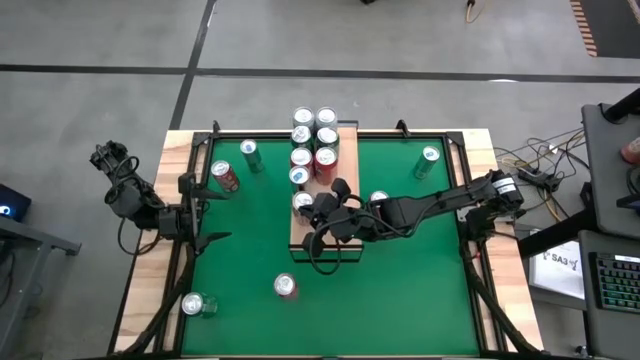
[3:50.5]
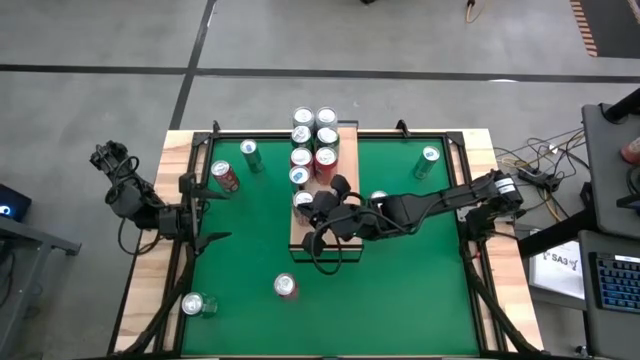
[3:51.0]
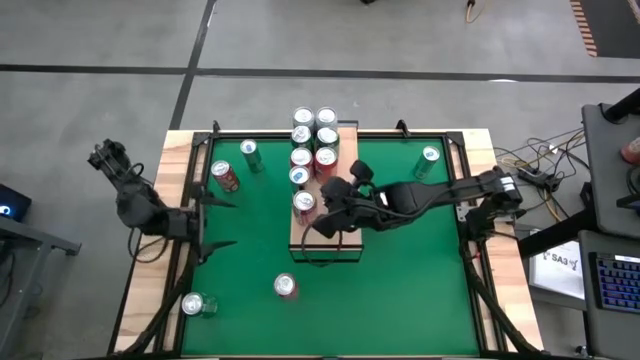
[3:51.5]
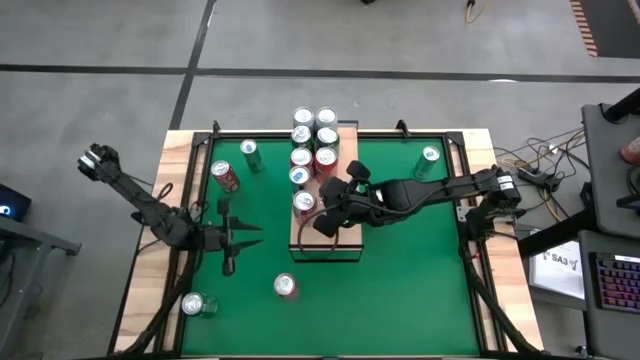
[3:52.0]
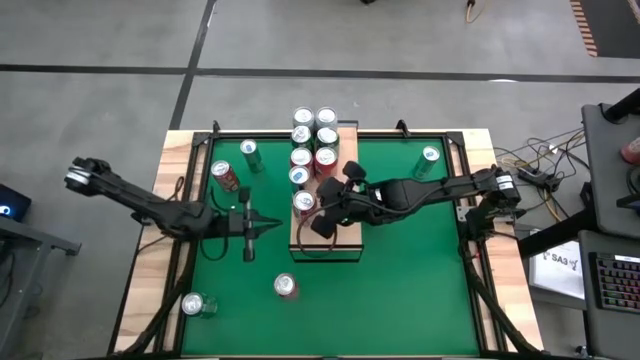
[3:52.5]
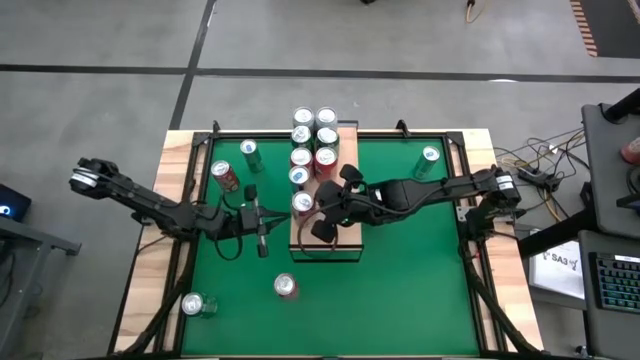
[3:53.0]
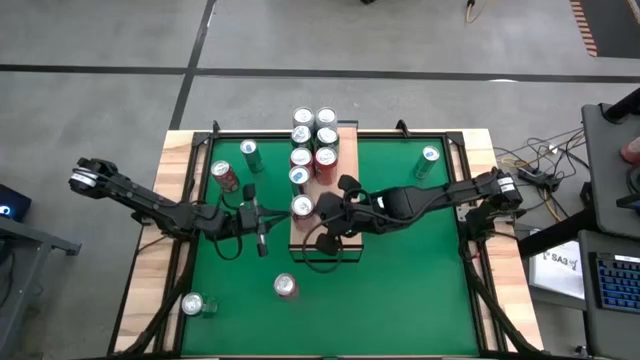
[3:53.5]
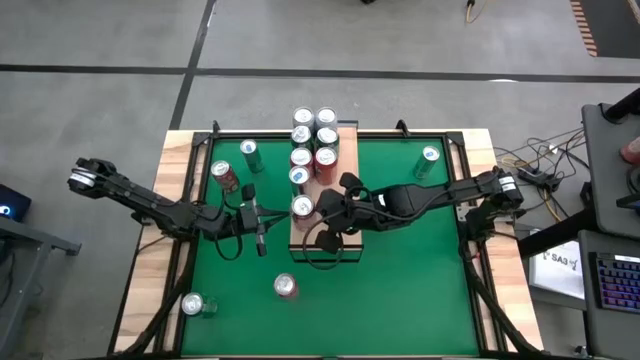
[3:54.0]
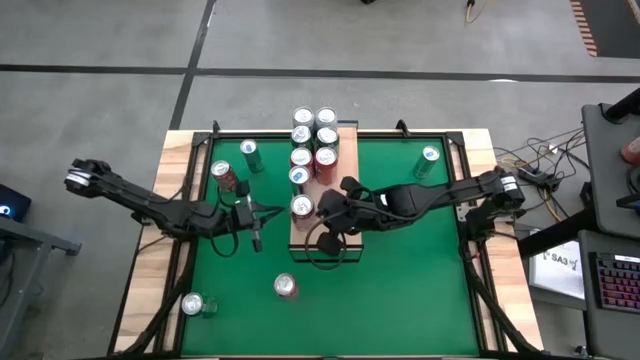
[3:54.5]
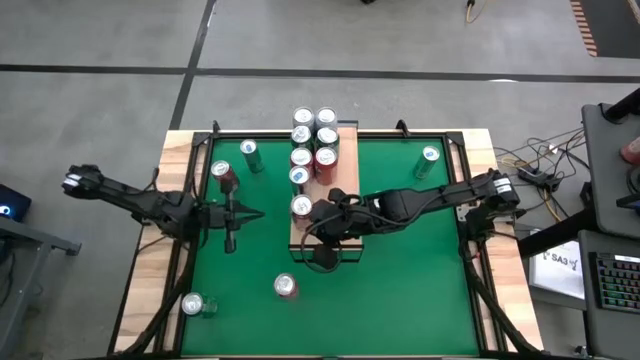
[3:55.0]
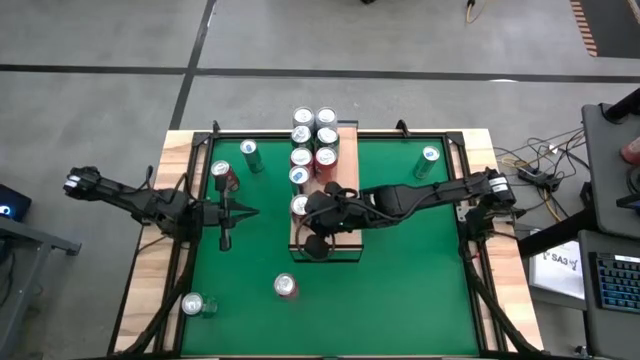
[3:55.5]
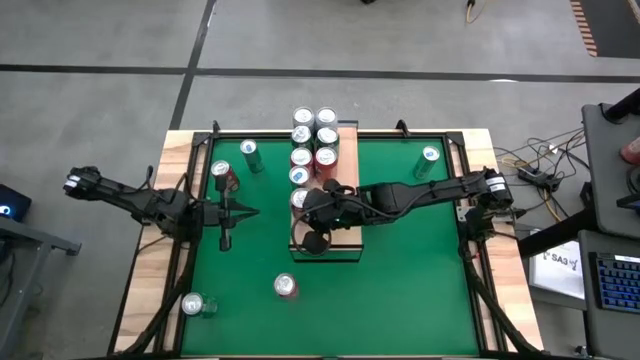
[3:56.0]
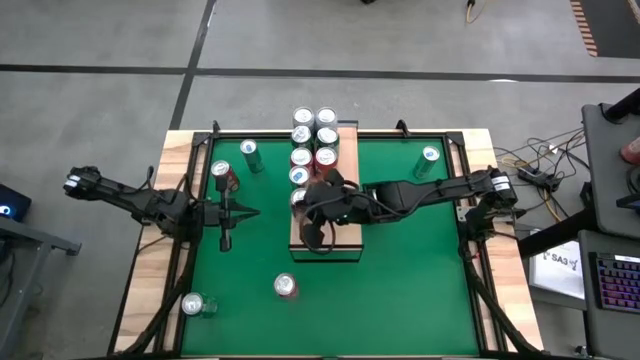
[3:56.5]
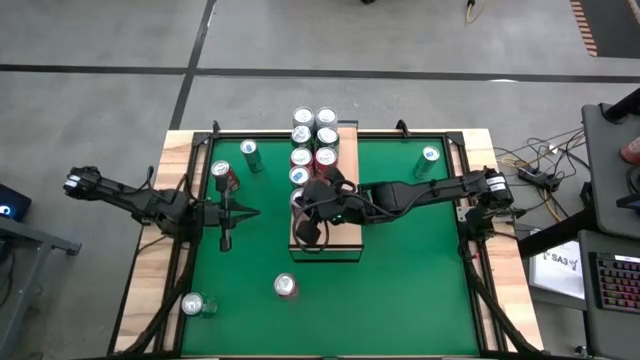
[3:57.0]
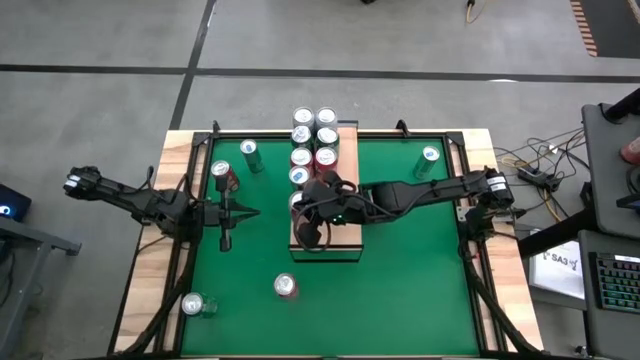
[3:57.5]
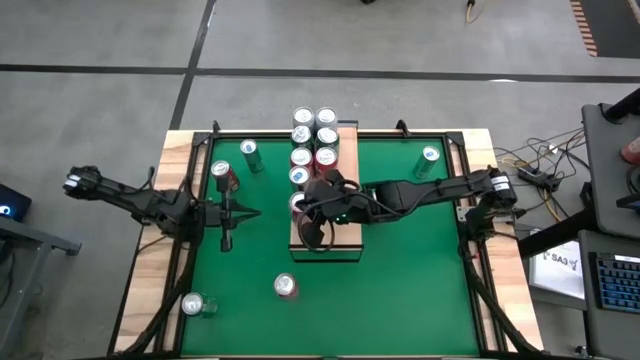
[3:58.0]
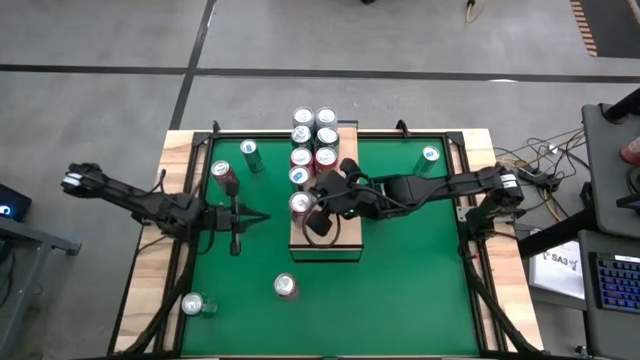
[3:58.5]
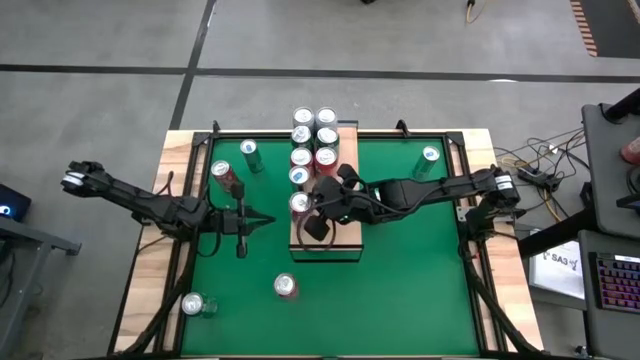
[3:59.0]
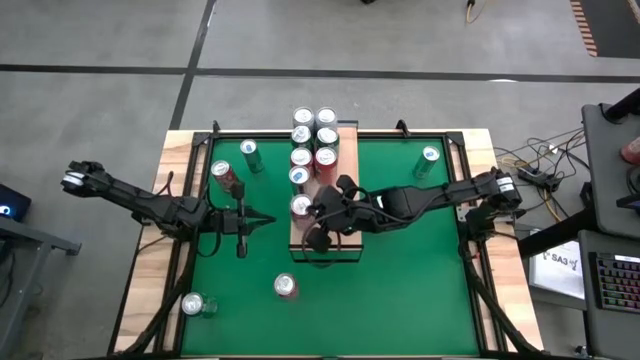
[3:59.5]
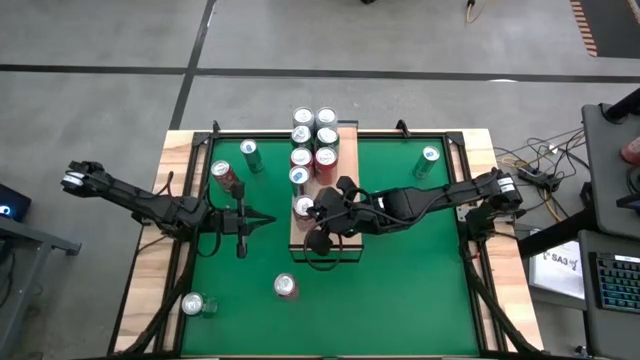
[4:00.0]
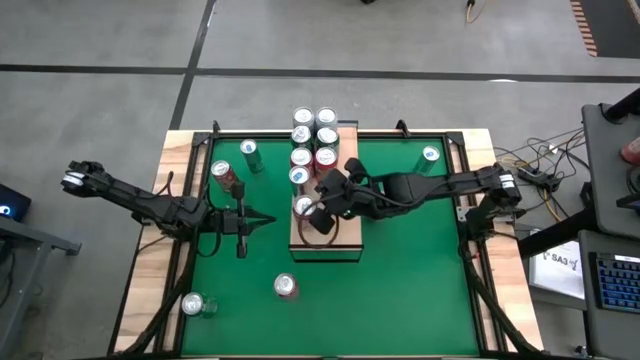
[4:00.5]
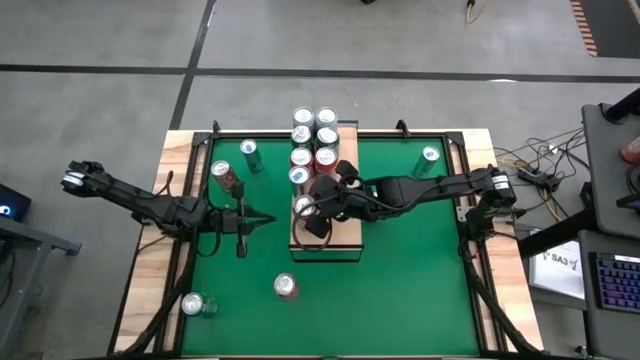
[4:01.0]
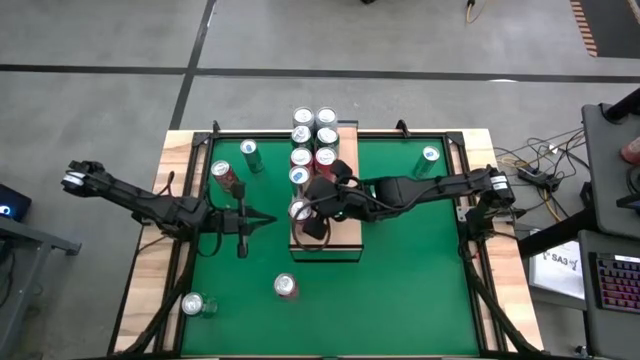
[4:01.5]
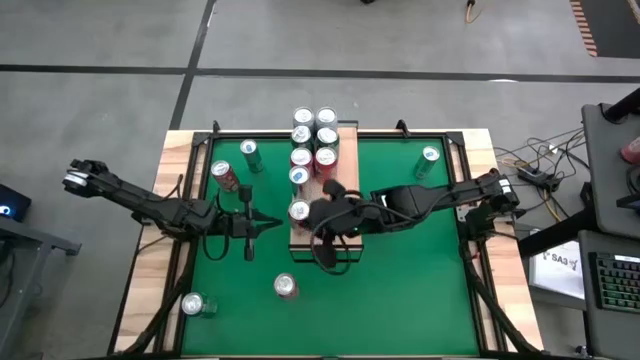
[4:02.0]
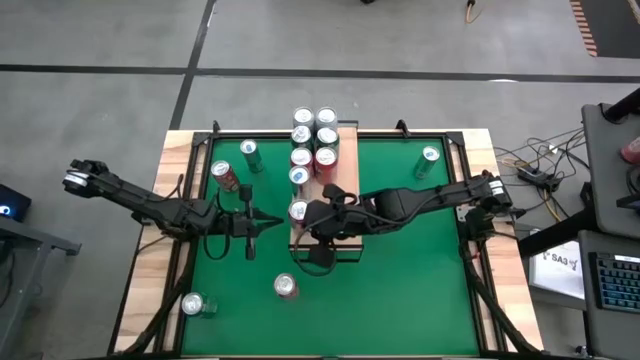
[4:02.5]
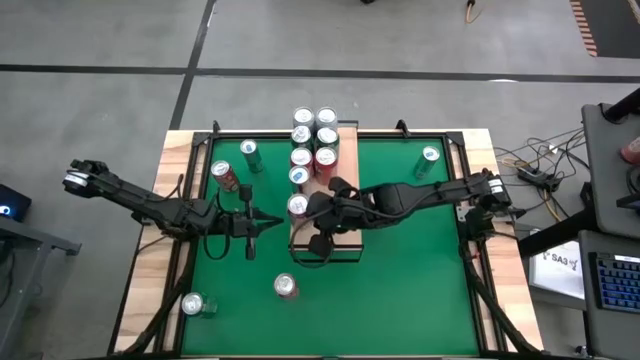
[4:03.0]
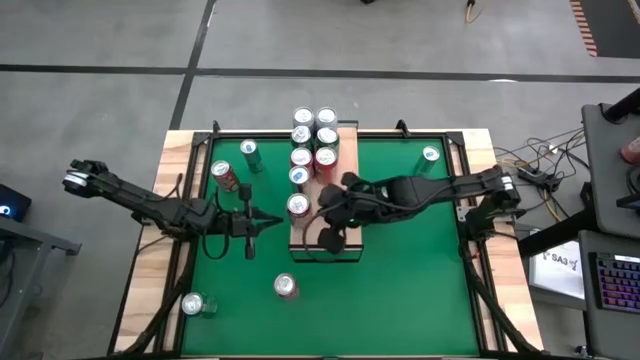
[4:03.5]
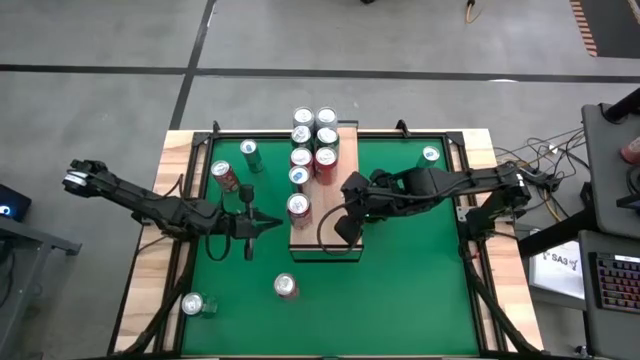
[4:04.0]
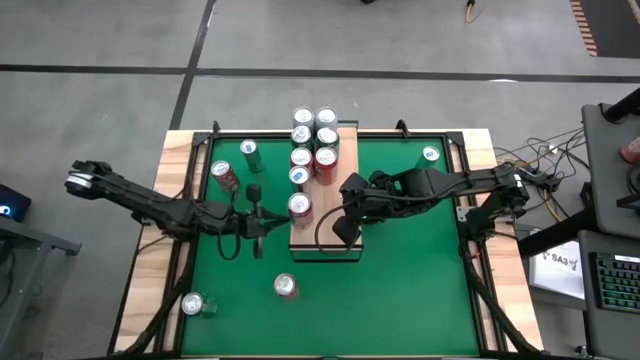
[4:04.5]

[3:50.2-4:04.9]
Task: Place canned beverage on shelf
Put the red can on the shelf

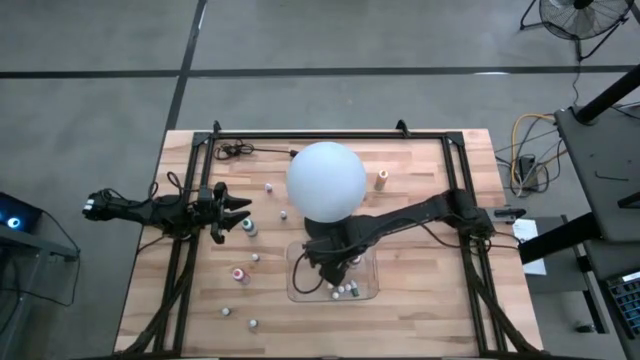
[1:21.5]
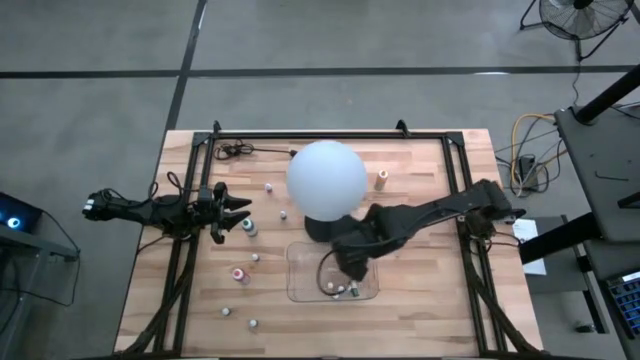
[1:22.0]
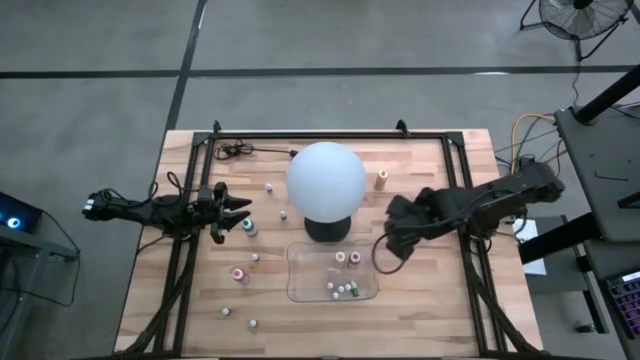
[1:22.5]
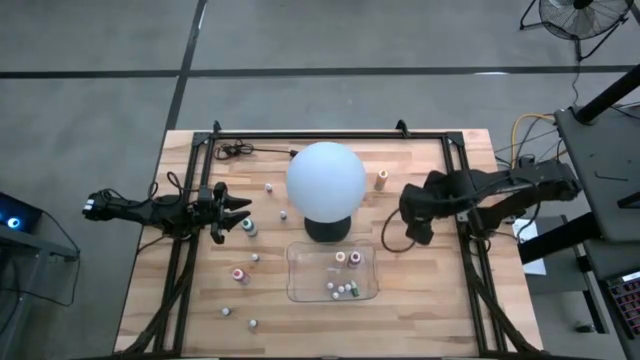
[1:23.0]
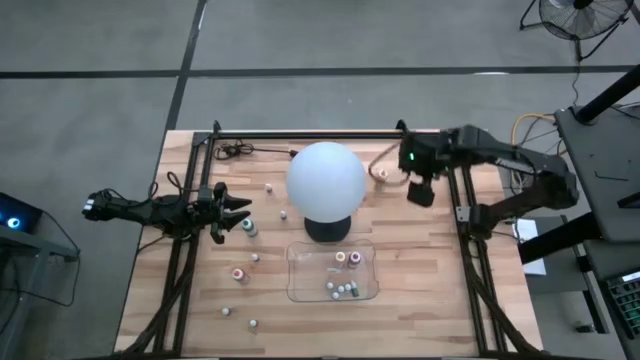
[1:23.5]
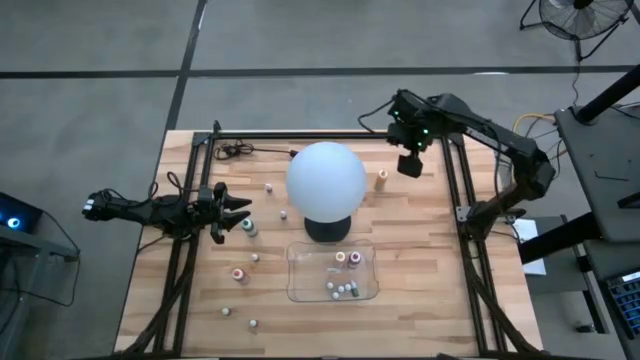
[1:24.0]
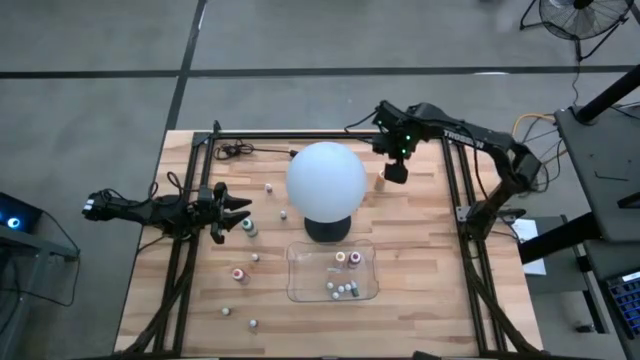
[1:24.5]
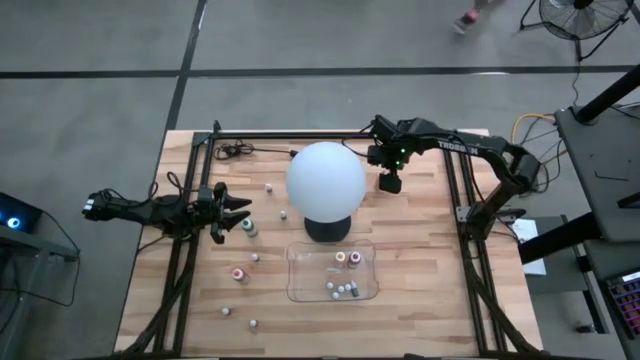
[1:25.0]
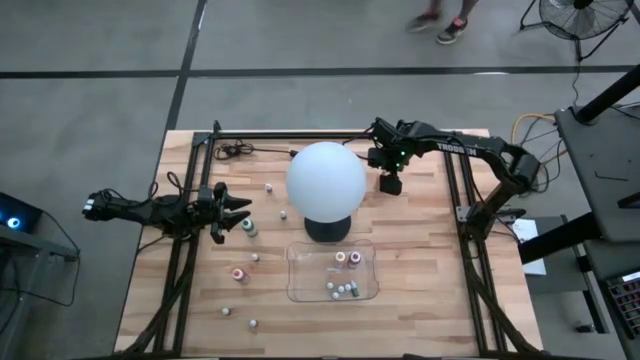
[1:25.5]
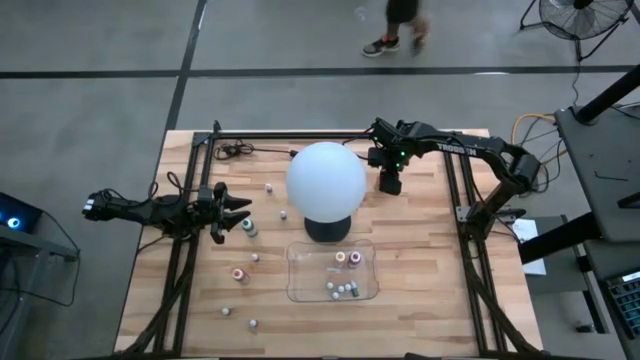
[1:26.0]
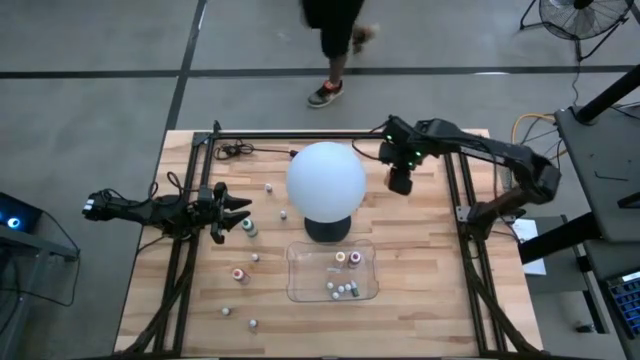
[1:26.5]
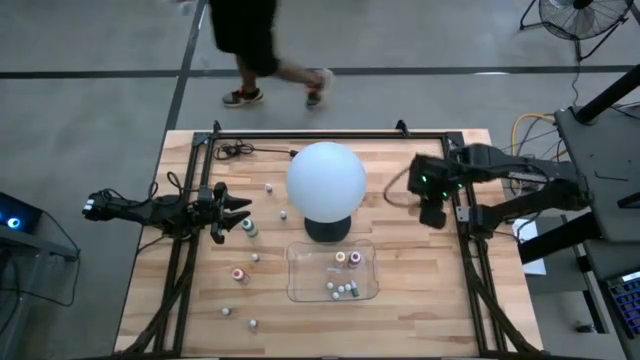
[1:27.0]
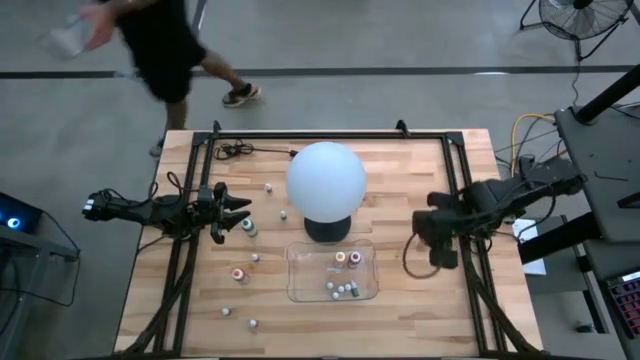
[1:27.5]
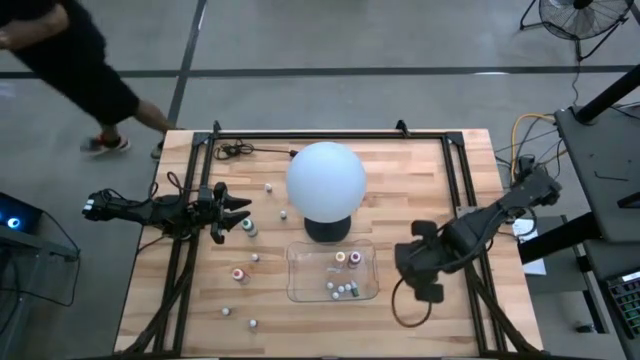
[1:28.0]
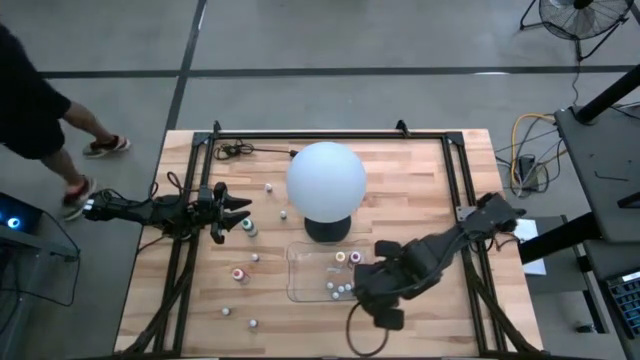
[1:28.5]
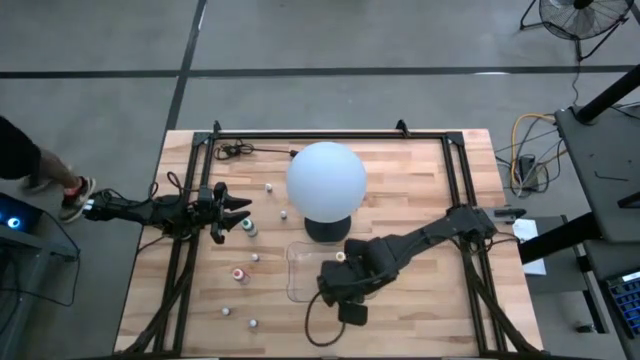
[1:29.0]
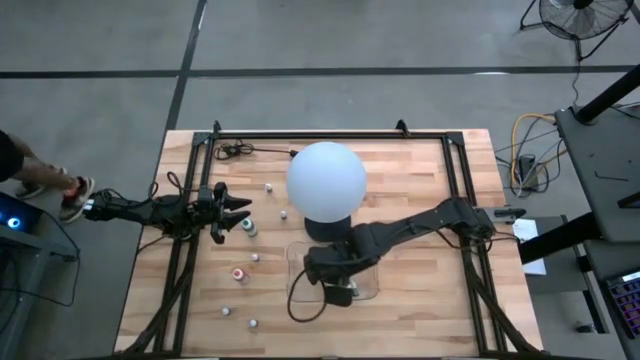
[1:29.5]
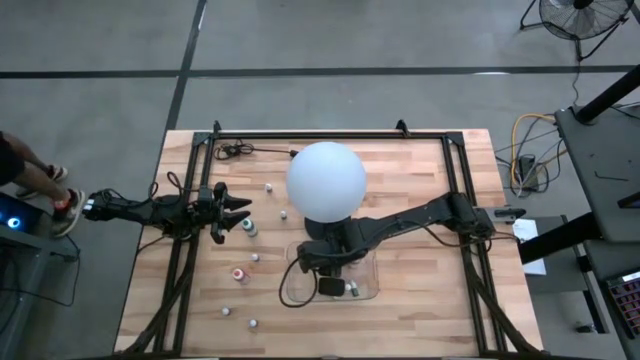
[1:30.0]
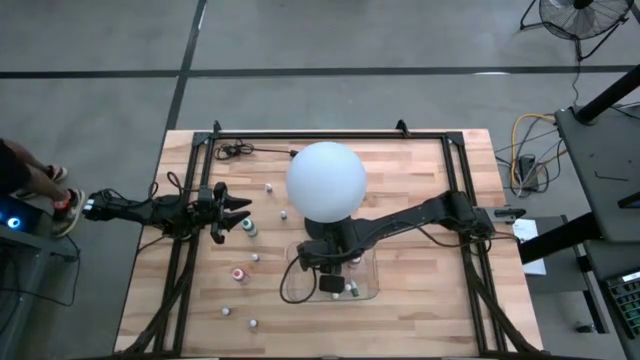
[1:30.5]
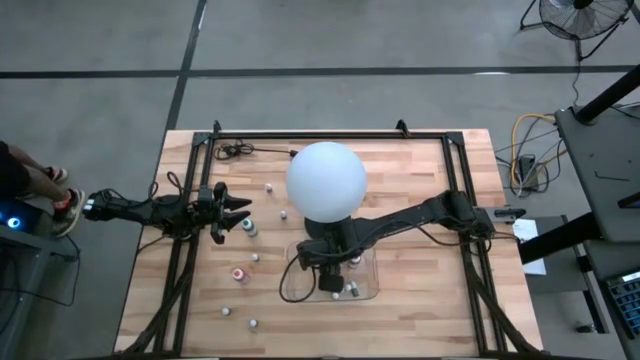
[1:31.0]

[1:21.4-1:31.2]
Task: Pick & Place food coloring
Put the big yellow food coloring bottle into the transparent bin
